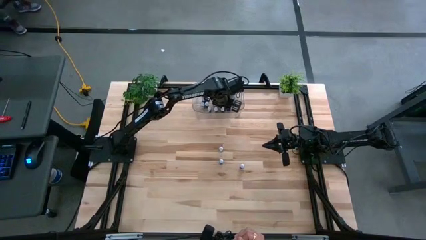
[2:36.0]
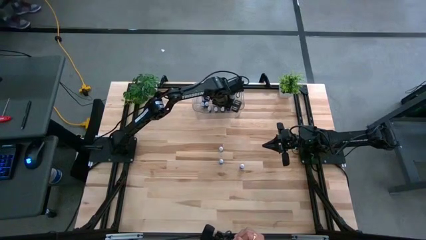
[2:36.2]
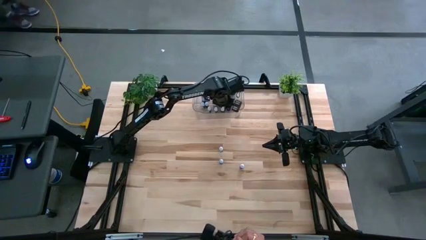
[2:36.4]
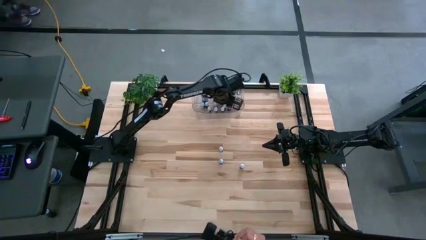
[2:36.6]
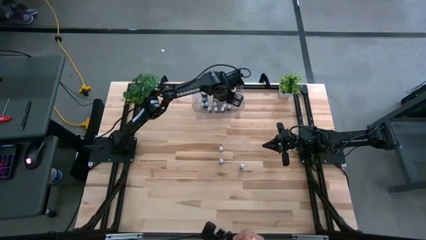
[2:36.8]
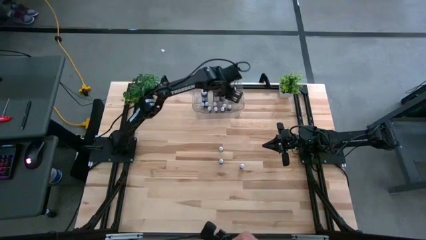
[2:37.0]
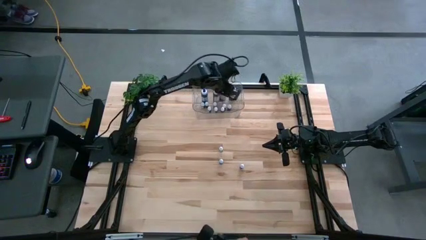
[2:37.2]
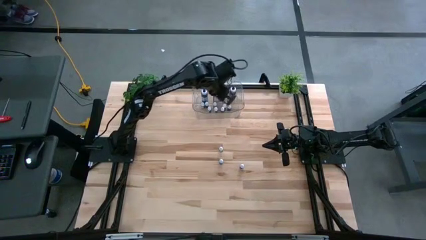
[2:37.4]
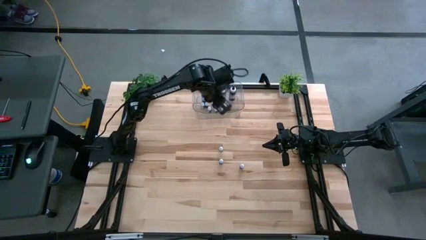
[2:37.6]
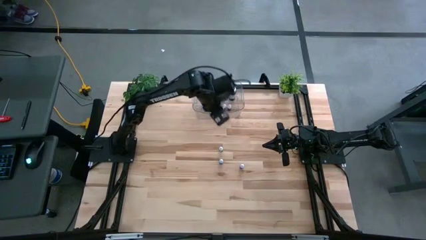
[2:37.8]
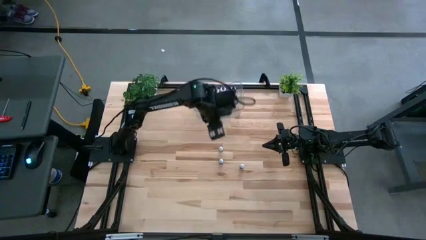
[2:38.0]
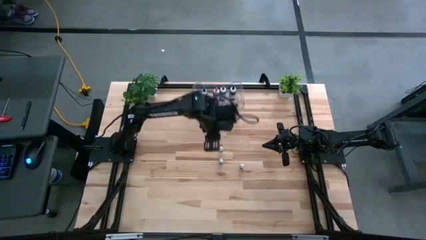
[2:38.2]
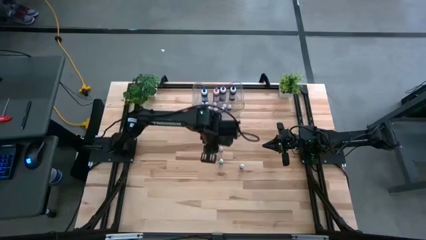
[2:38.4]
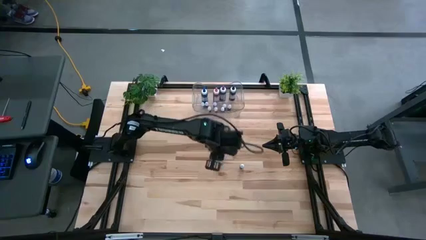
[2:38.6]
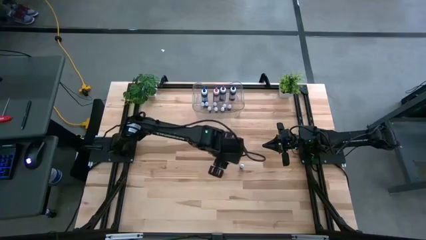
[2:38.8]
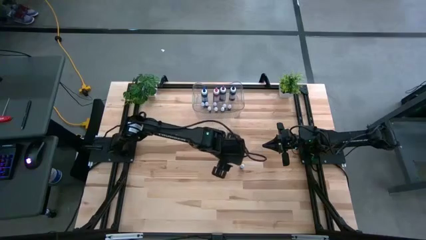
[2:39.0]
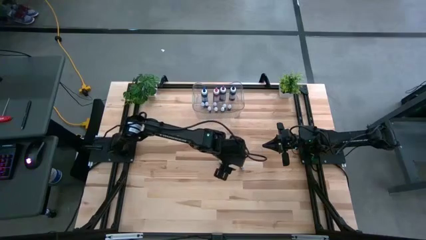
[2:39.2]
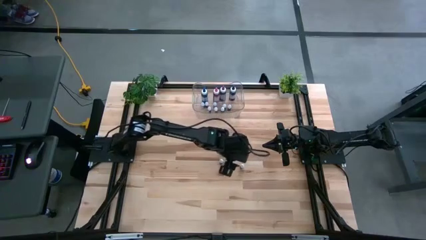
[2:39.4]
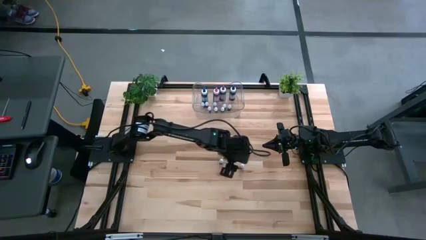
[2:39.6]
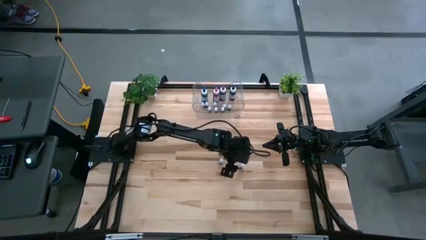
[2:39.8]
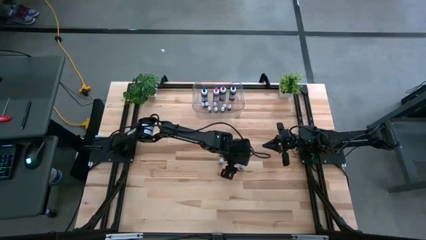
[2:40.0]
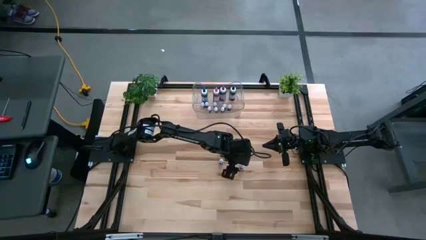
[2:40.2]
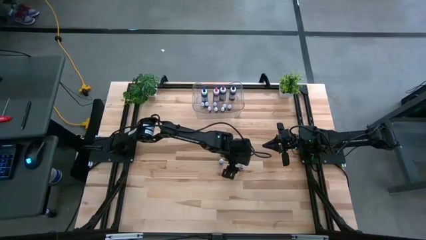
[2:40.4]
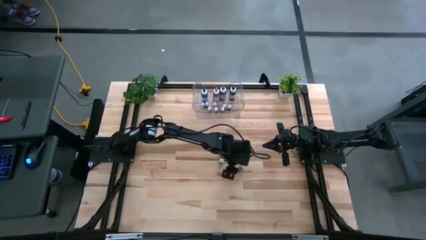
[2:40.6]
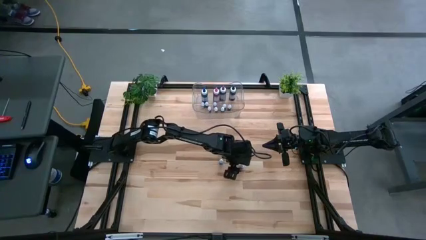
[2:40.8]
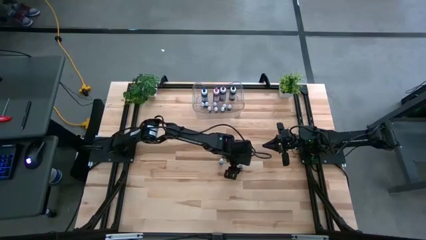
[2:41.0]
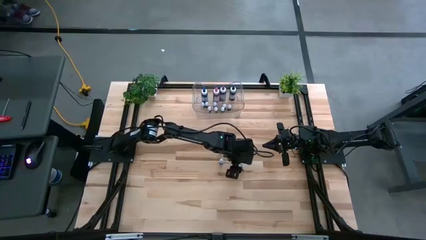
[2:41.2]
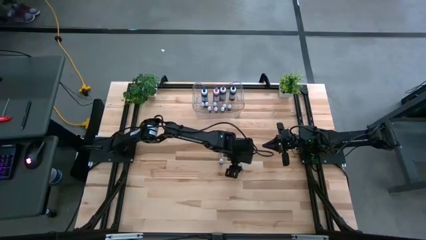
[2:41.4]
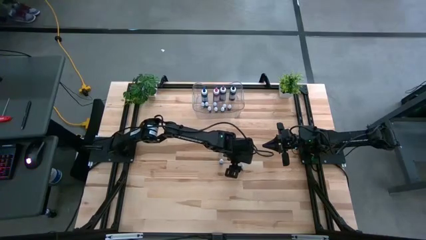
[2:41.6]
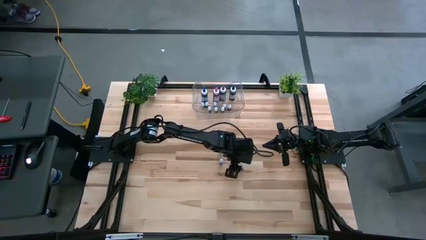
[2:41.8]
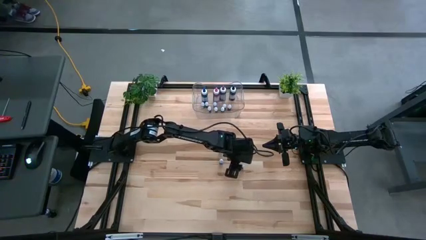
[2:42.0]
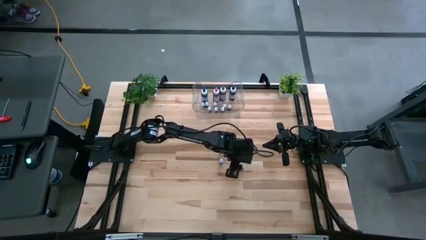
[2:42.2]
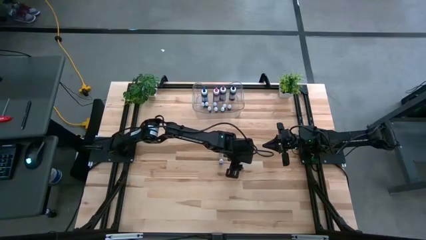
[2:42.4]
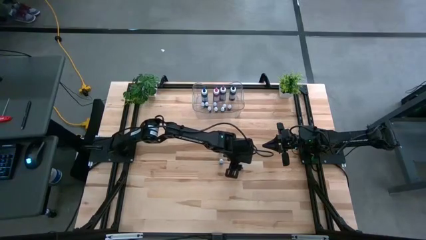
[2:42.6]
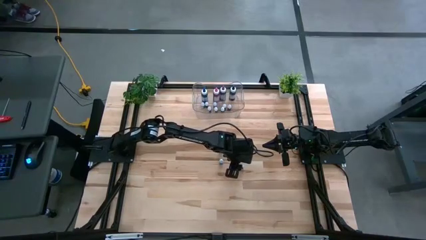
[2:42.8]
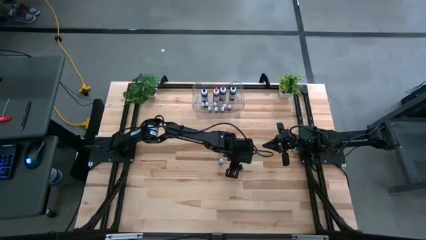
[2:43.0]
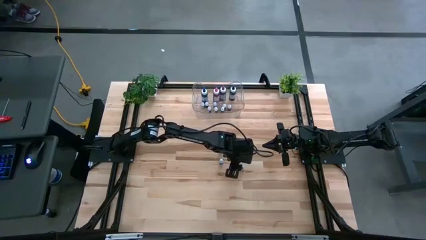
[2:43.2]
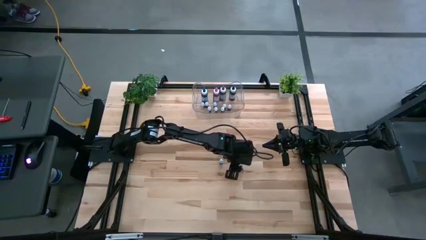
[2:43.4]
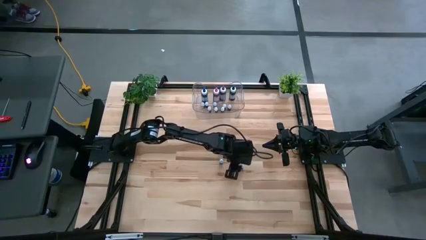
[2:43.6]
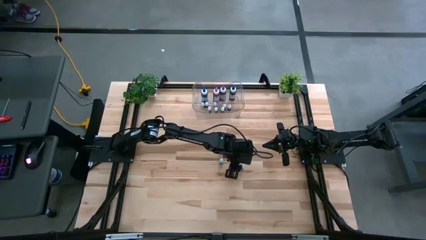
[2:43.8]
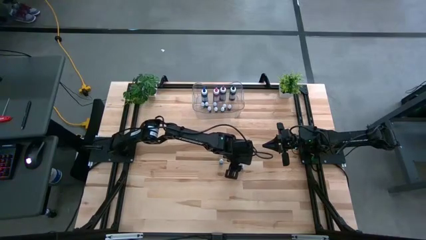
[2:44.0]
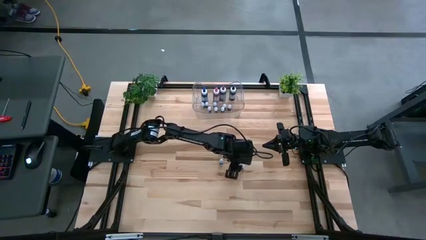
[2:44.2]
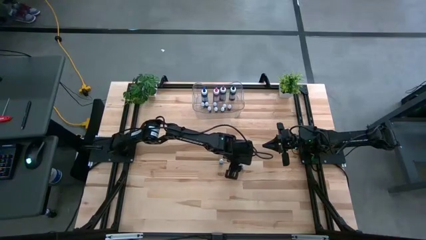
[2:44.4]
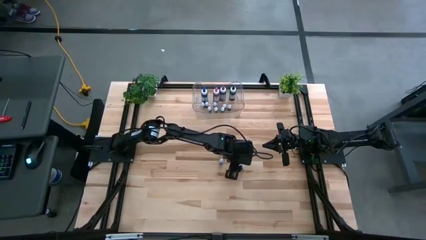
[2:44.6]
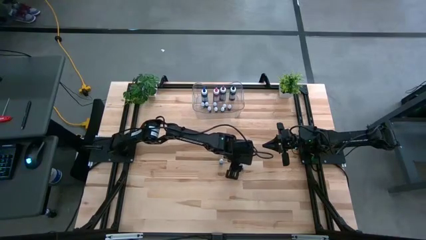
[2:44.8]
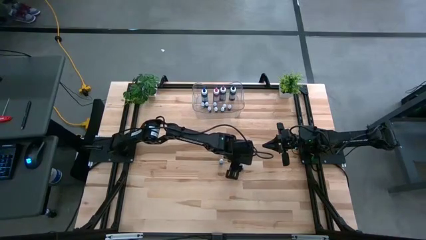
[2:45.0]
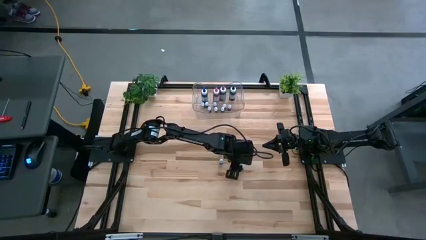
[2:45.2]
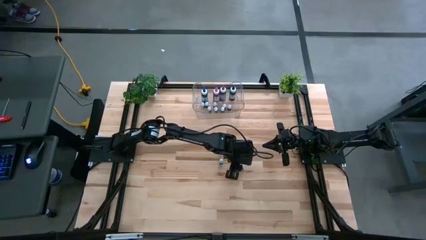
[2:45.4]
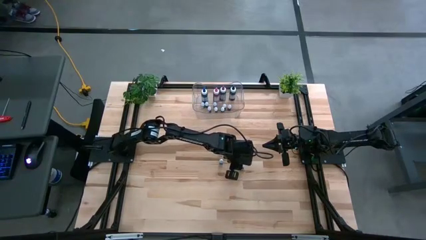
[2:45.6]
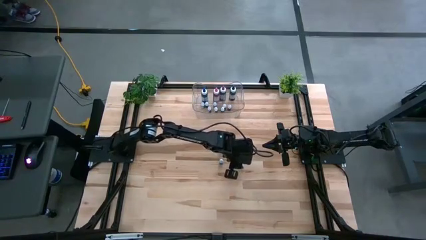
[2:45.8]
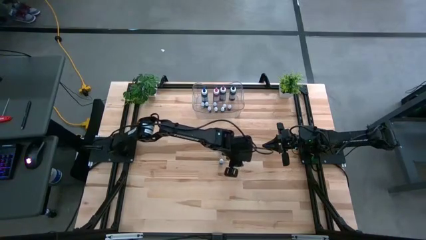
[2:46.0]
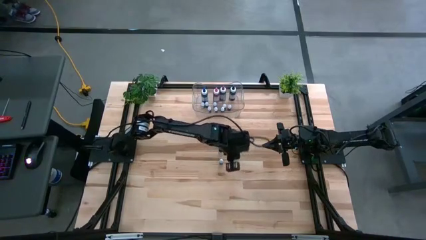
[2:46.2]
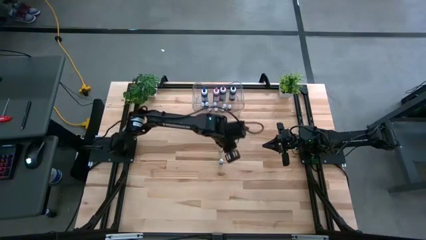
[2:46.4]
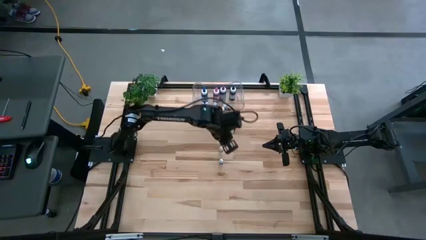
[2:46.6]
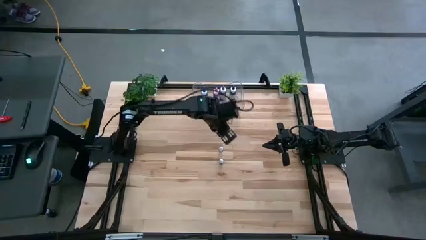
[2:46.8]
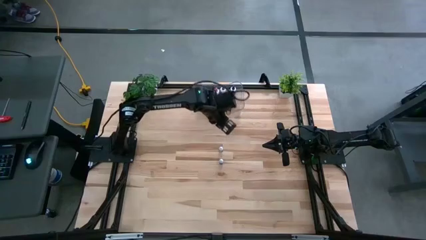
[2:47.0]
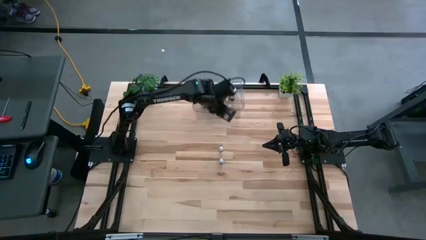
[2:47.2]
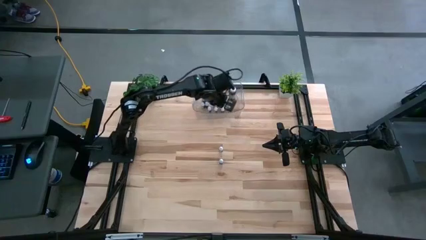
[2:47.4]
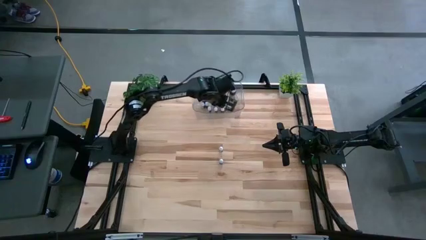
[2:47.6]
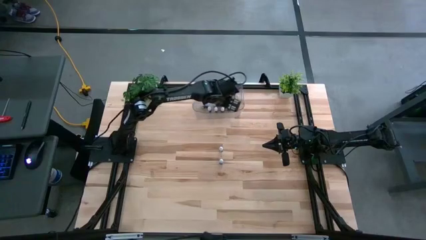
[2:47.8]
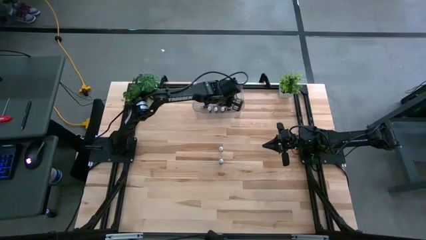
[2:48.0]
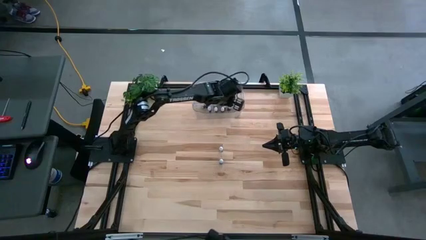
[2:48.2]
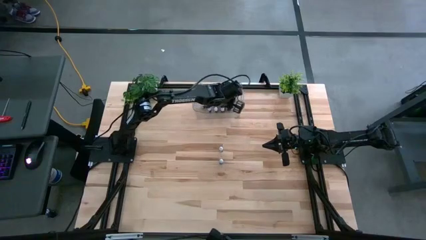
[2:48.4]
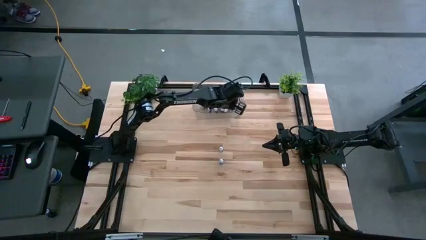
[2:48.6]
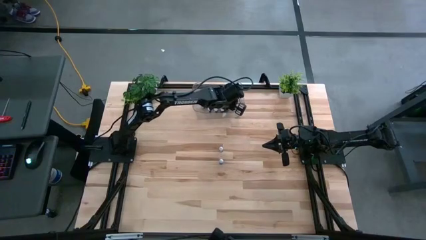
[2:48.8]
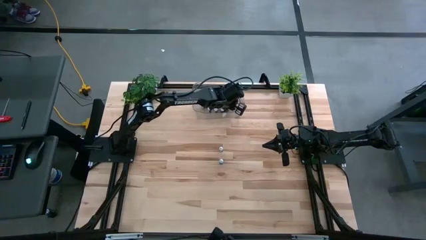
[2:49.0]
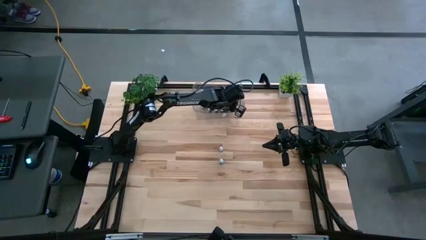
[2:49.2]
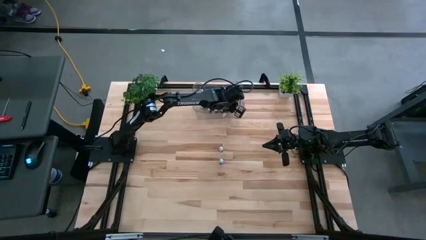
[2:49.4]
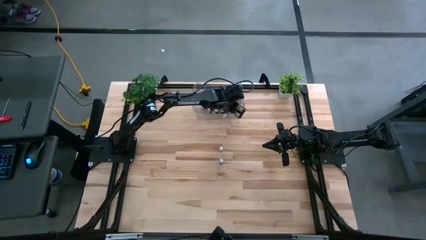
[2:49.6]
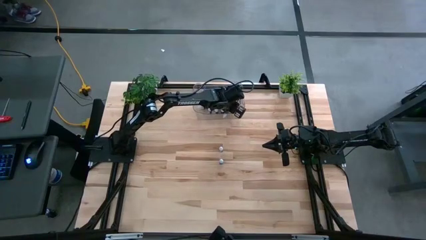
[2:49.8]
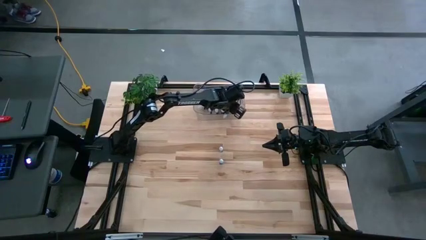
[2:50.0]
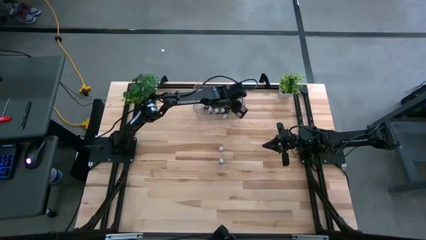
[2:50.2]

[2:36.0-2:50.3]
Task: Pick & Place food coloring
Put the right small blue food coloring bottle into the transparent bin
